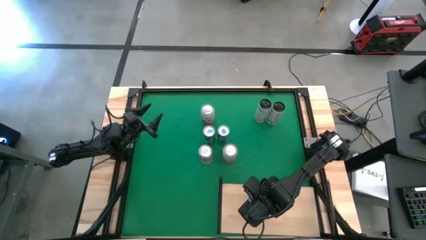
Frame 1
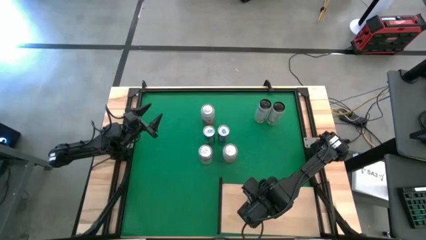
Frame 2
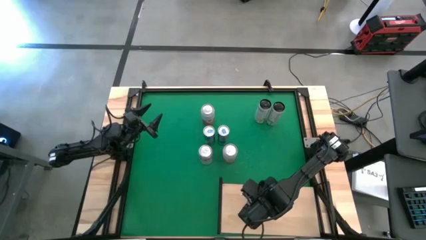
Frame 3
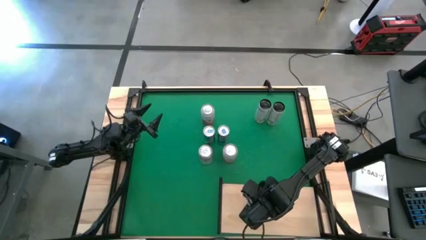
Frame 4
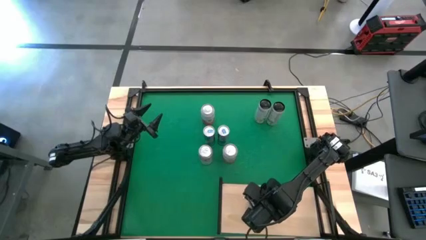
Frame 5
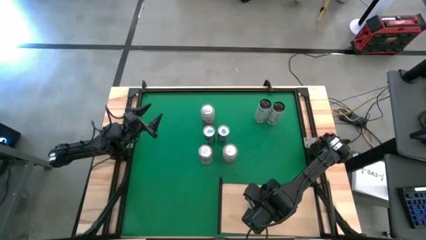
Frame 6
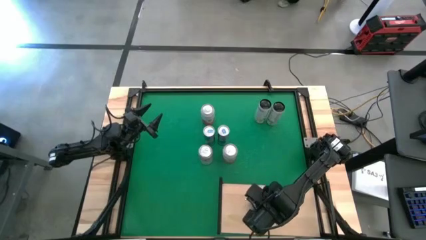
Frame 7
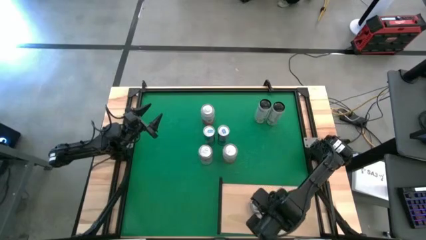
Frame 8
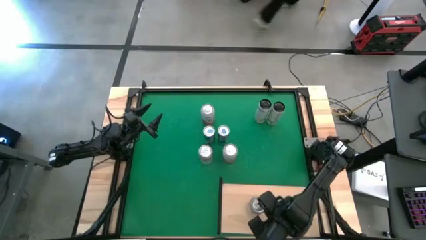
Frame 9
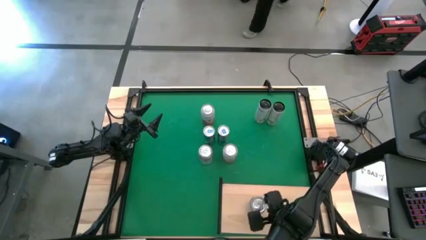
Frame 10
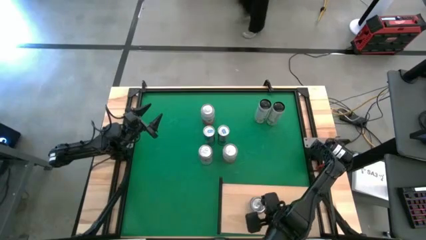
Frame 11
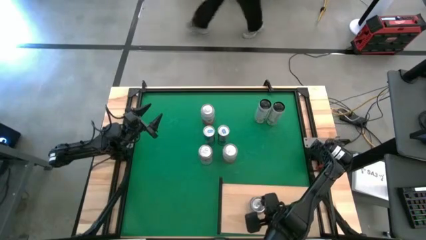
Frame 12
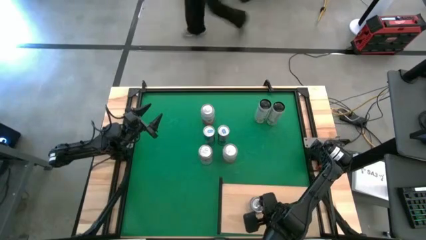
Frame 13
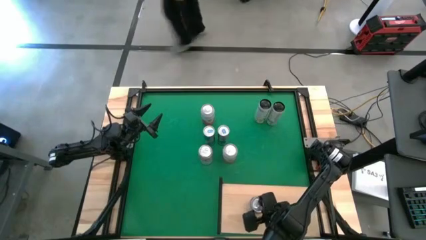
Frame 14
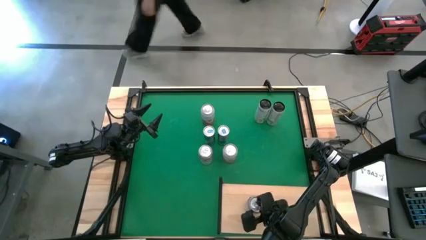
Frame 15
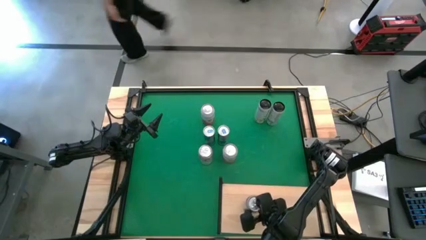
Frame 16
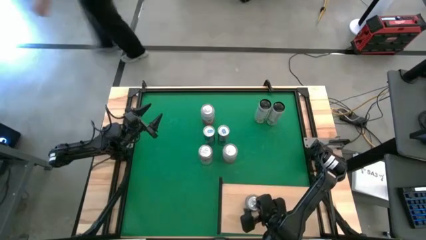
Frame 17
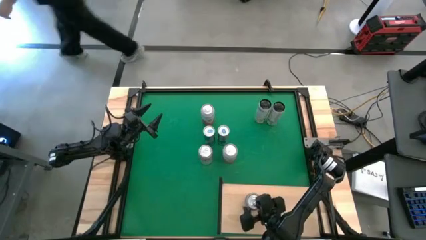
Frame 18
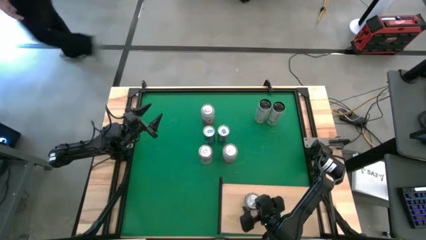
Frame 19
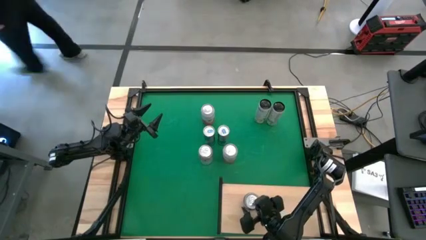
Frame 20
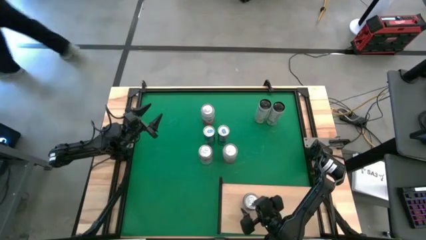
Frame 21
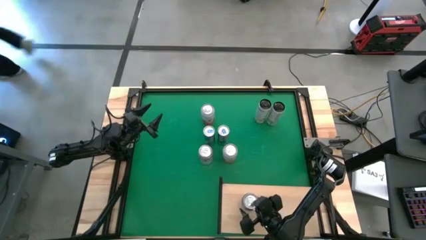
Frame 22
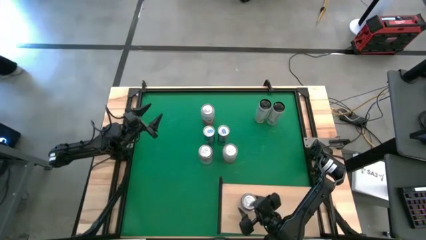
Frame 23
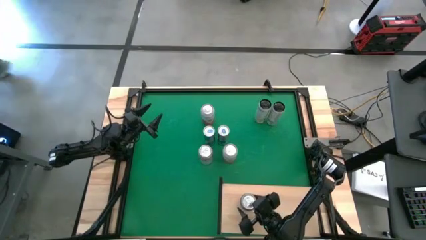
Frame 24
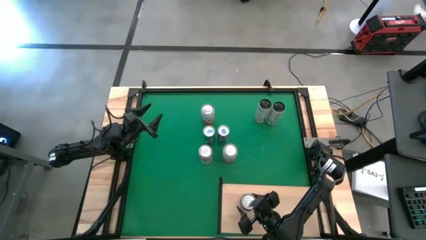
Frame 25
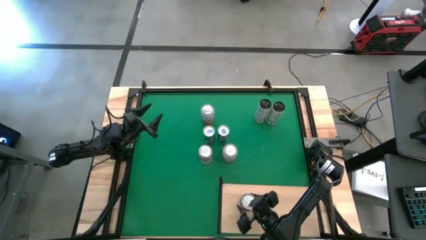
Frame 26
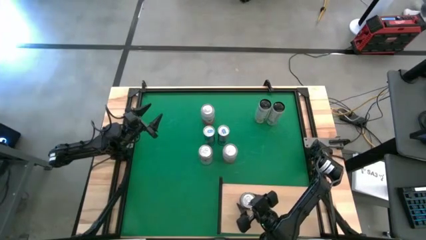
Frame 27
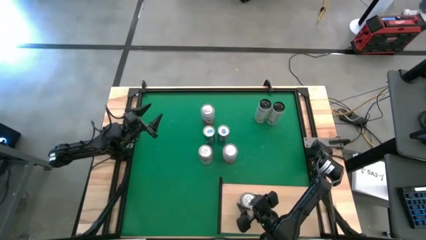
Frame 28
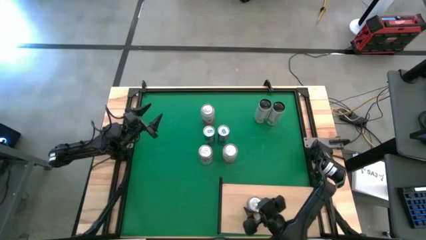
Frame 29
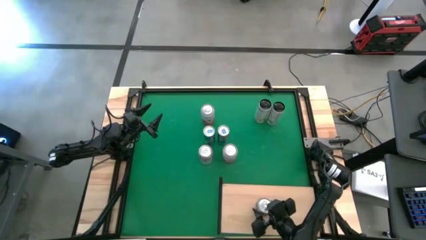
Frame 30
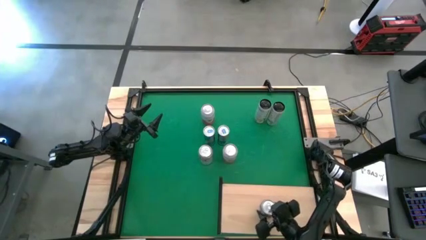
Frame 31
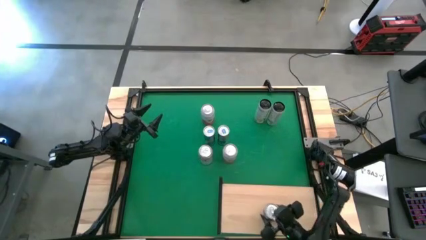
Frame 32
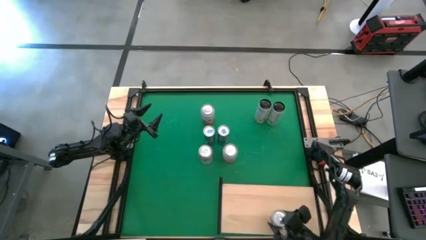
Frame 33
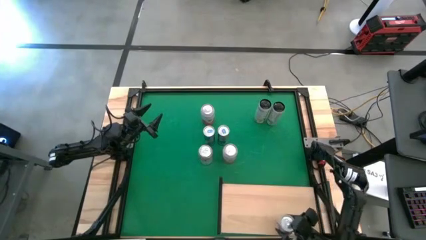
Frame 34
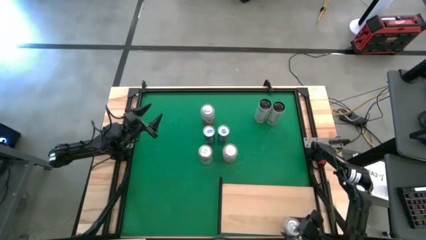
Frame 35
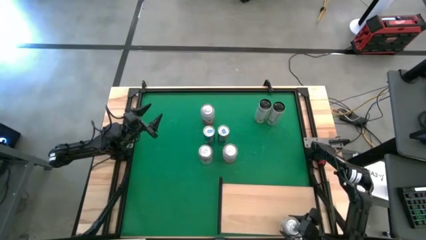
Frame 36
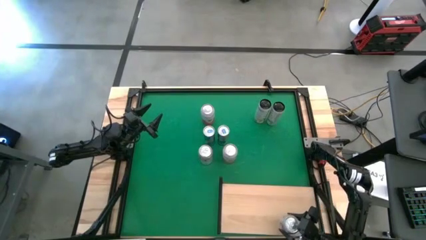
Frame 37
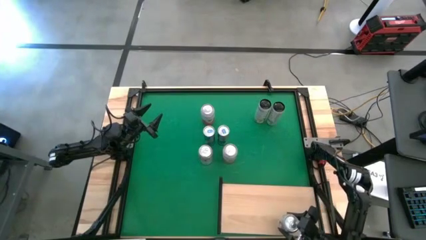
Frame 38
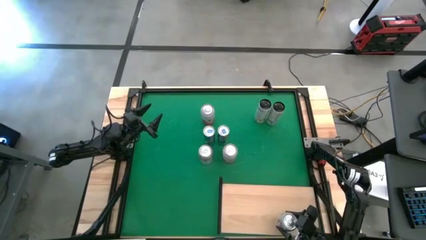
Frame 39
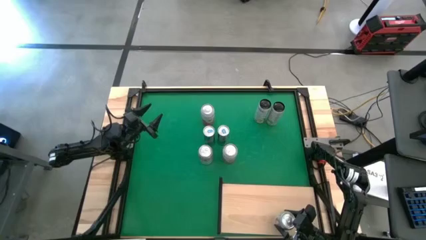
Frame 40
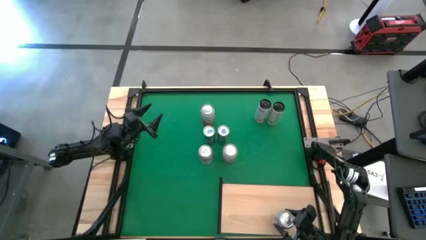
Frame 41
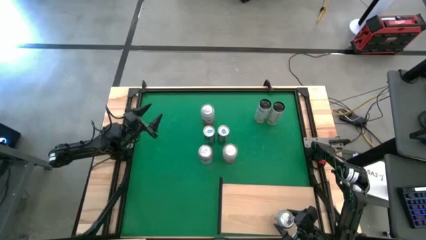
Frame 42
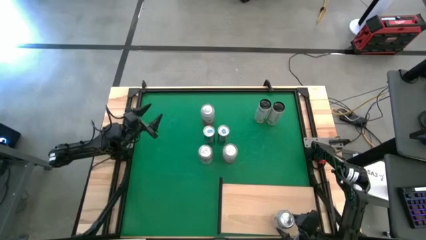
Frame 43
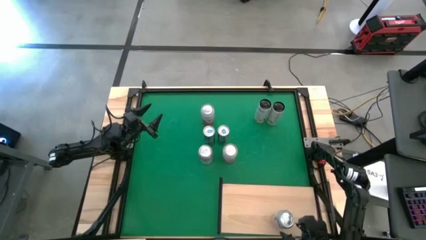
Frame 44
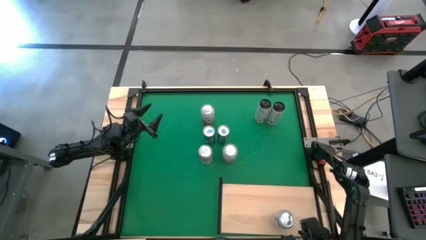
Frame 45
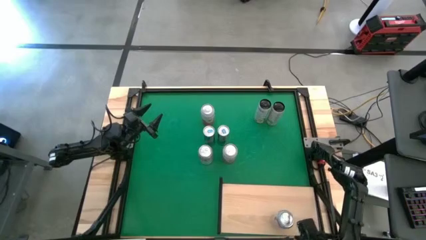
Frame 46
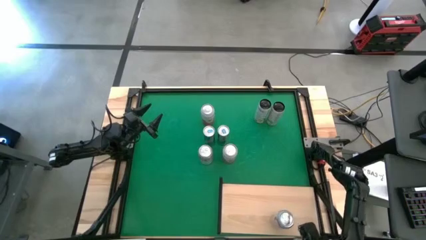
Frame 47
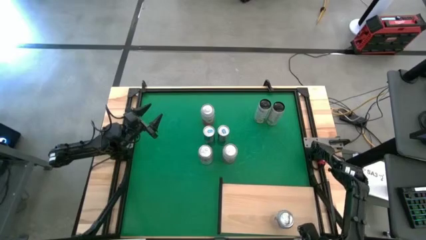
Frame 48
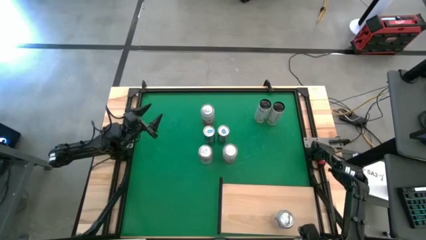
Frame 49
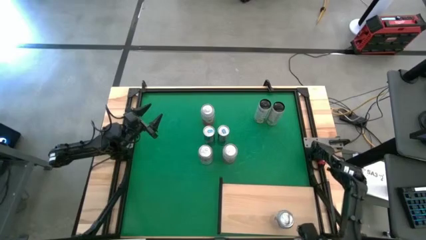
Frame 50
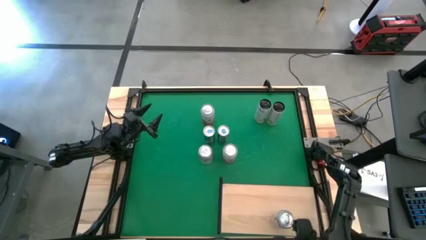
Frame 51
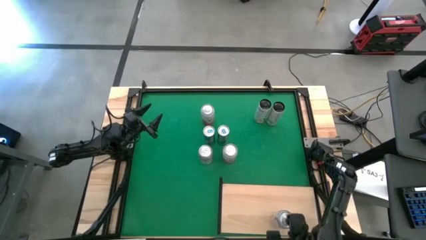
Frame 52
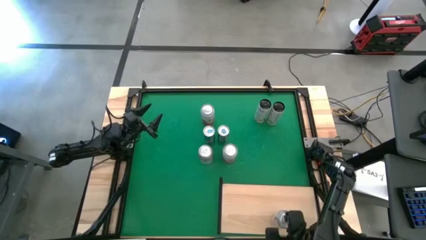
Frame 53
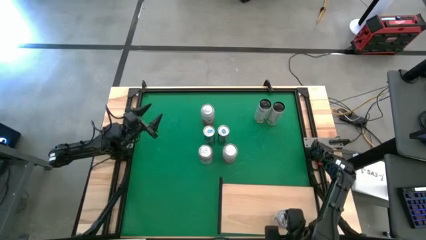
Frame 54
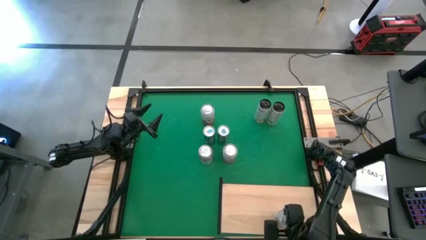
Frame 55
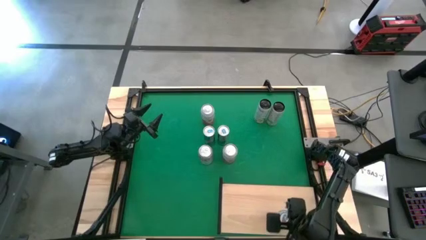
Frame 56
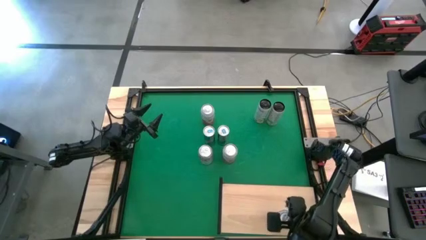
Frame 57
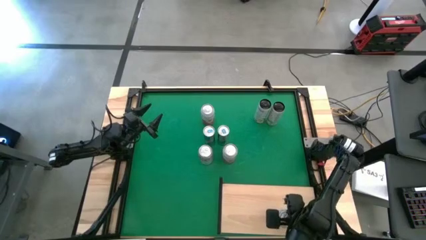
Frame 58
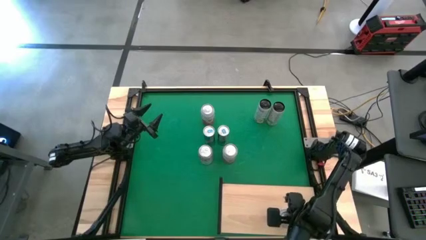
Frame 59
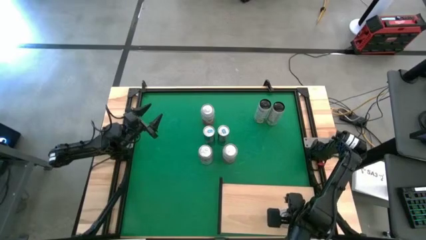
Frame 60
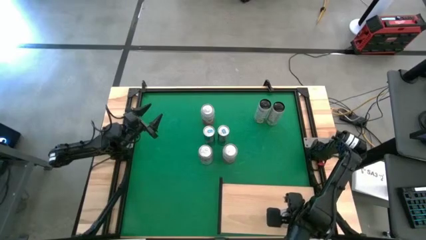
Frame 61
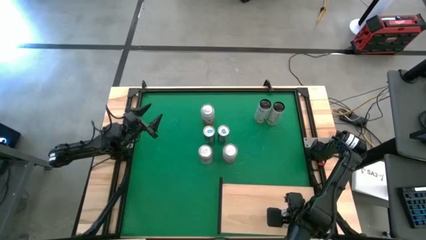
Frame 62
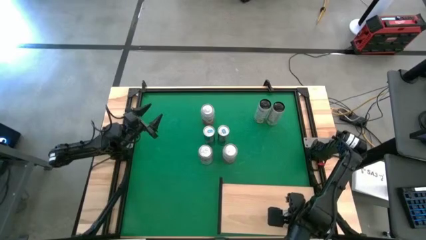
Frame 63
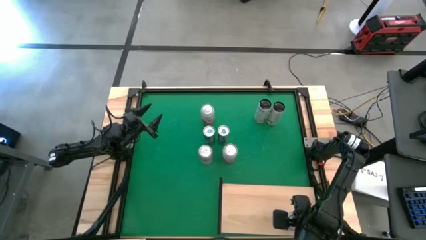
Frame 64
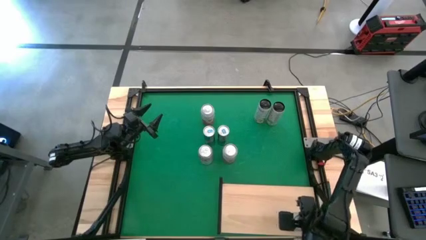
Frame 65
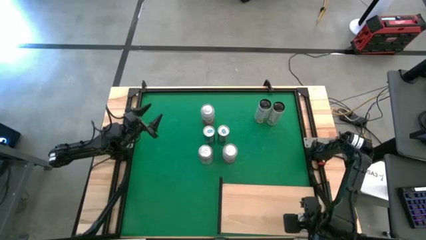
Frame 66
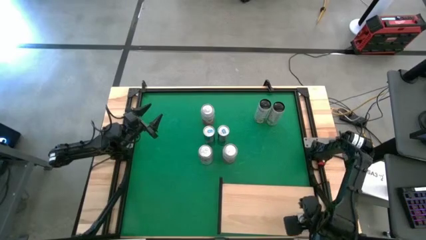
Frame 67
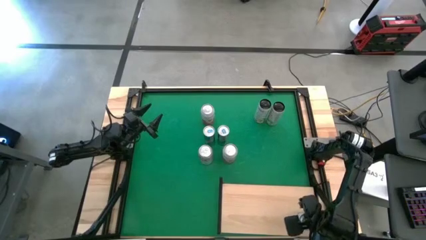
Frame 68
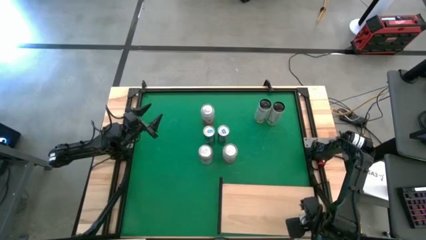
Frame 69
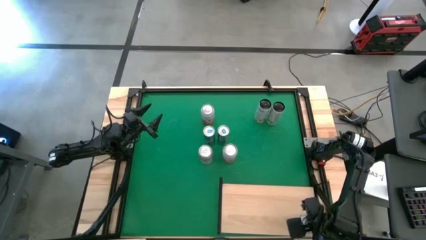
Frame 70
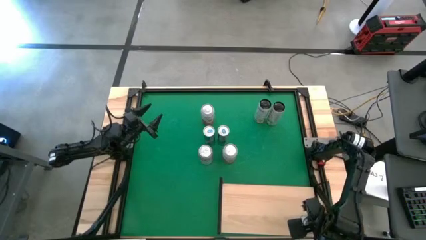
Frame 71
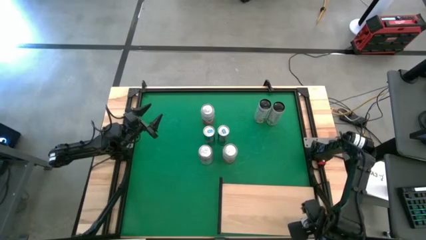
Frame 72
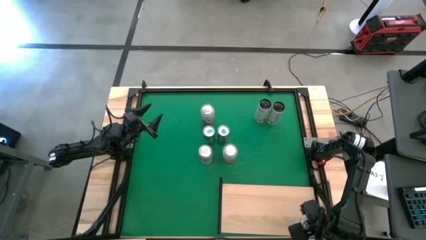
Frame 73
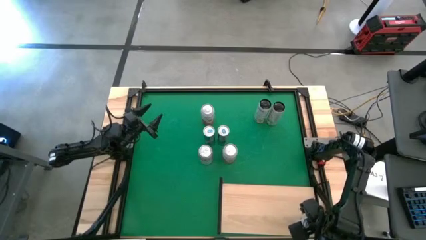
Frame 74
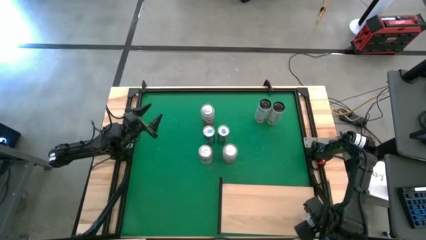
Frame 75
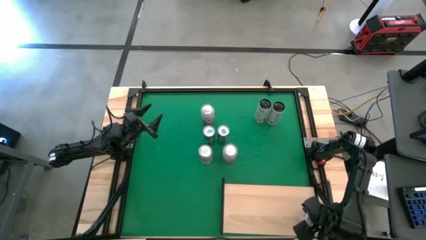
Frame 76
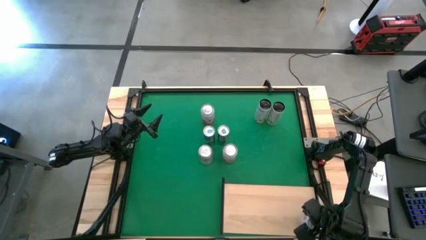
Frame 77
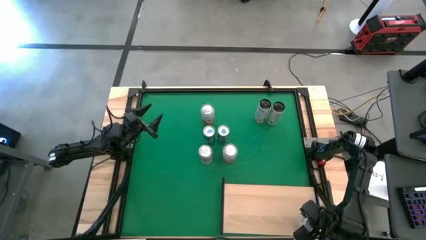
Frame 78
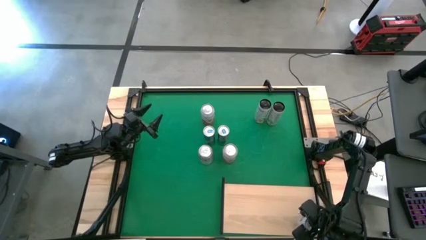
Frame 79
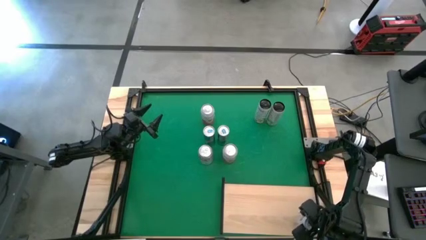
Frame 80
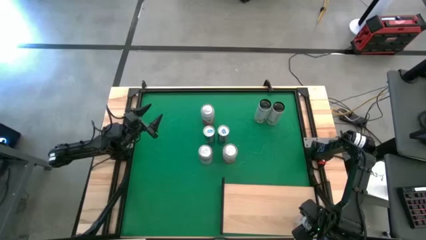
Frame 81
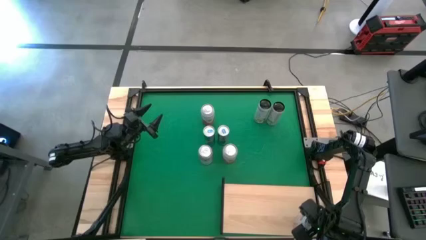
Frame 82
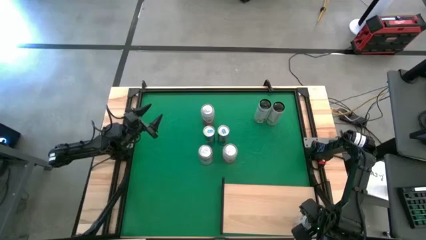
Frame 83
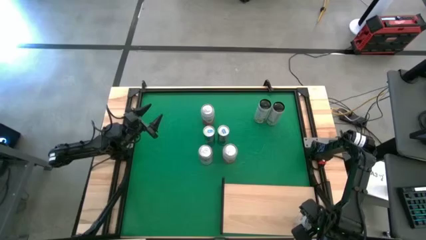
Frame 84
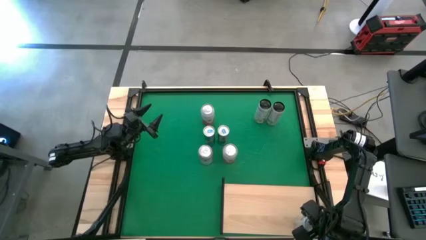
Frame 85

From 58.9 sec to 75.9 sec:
Task: Place canned beverage on shelf
Put the right red-silver soda can on the shelf
